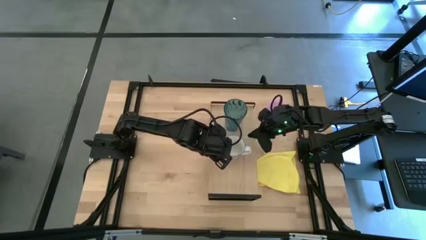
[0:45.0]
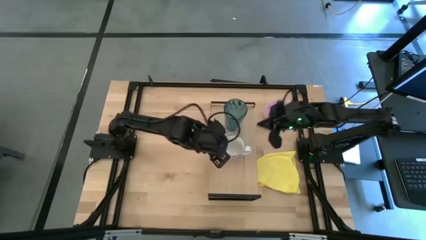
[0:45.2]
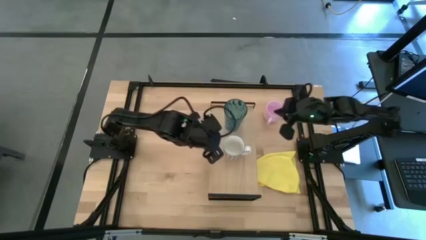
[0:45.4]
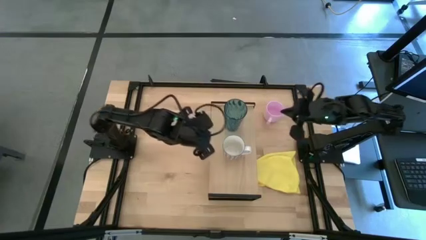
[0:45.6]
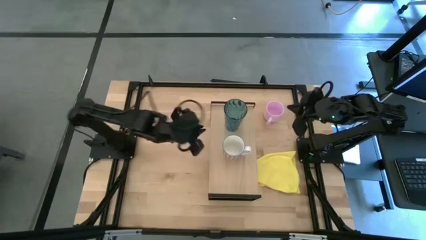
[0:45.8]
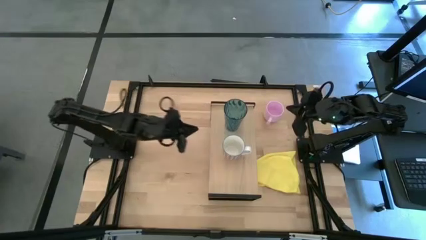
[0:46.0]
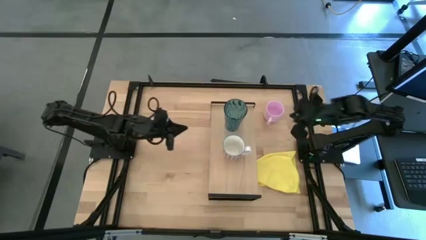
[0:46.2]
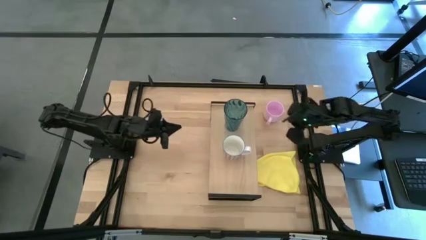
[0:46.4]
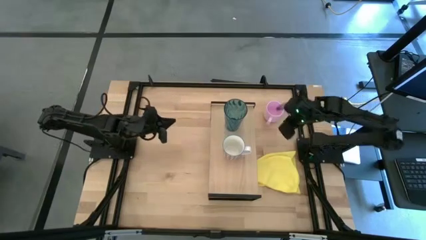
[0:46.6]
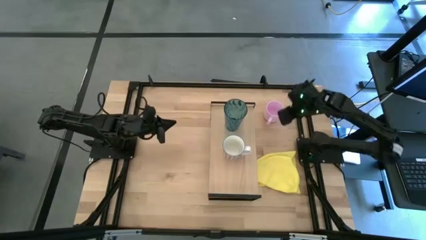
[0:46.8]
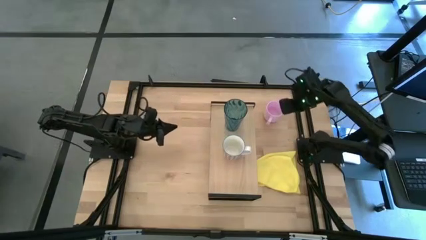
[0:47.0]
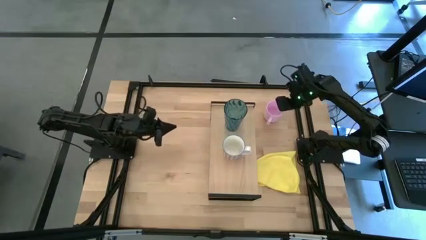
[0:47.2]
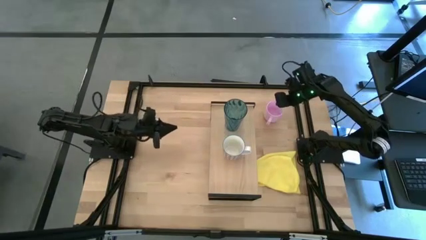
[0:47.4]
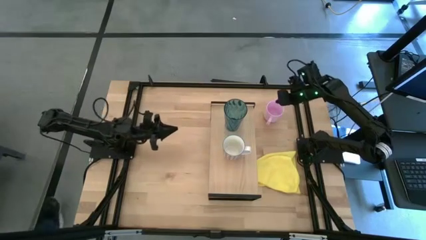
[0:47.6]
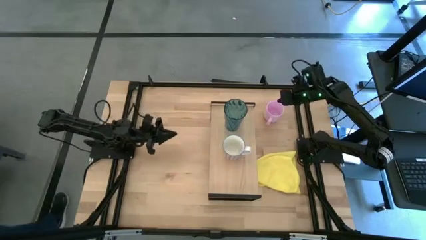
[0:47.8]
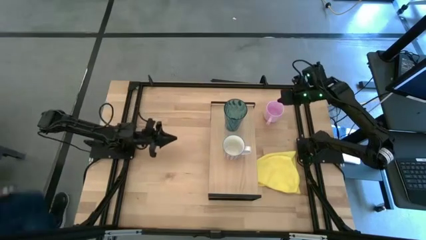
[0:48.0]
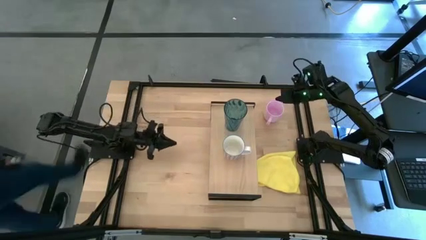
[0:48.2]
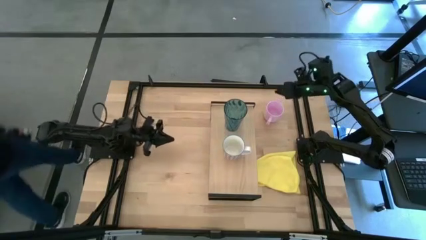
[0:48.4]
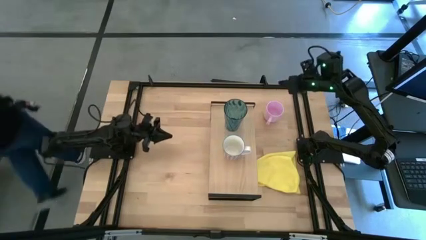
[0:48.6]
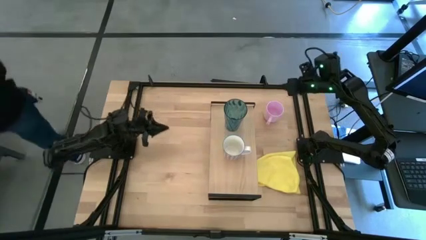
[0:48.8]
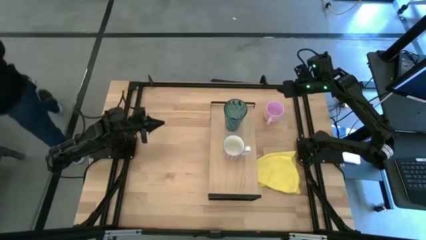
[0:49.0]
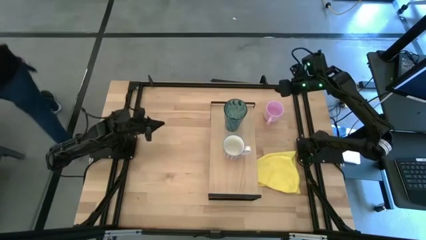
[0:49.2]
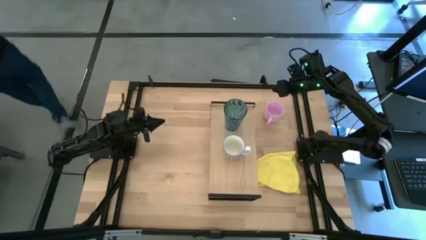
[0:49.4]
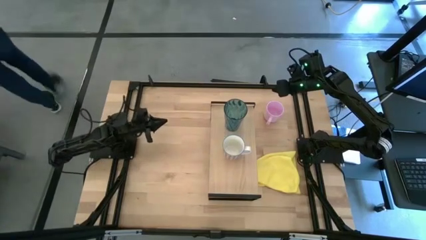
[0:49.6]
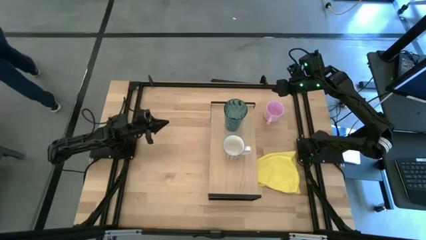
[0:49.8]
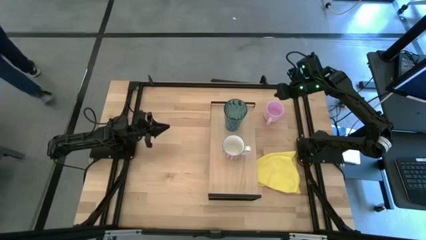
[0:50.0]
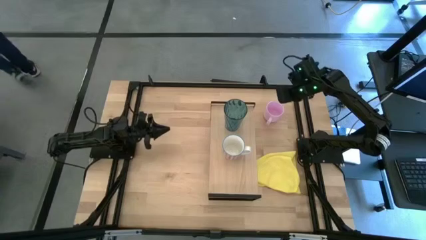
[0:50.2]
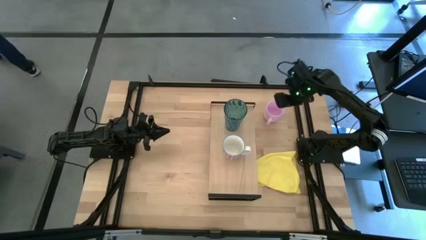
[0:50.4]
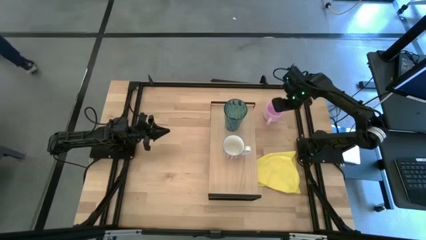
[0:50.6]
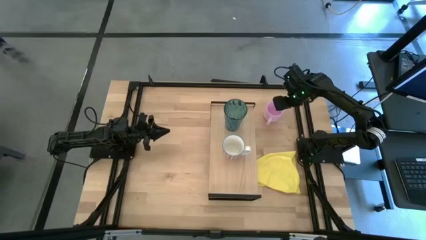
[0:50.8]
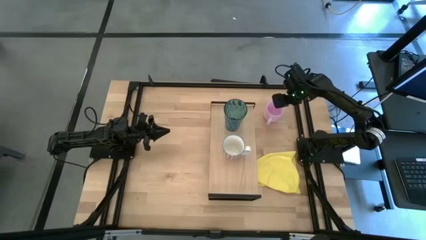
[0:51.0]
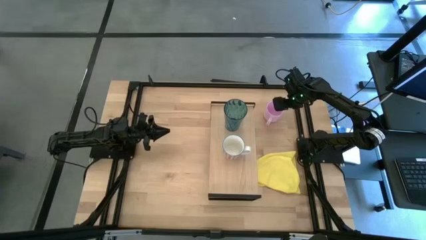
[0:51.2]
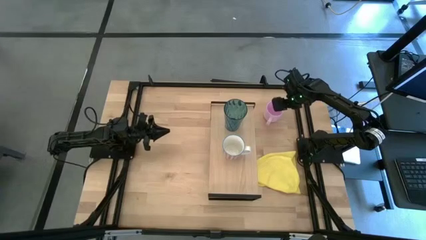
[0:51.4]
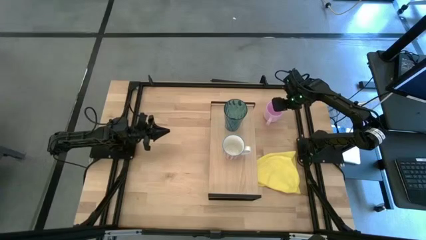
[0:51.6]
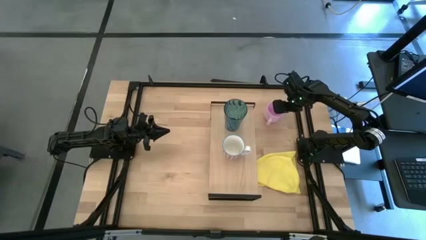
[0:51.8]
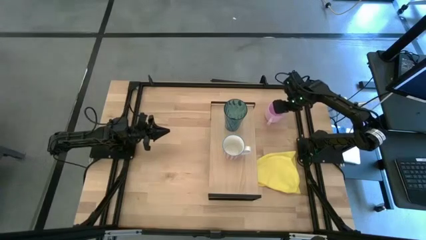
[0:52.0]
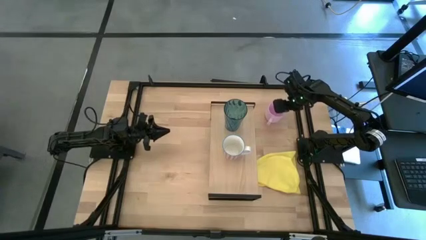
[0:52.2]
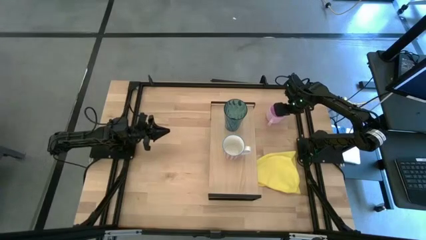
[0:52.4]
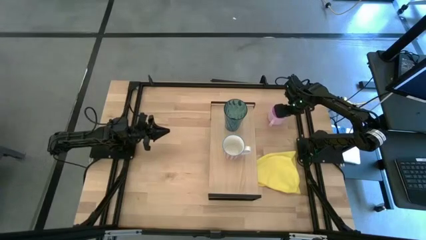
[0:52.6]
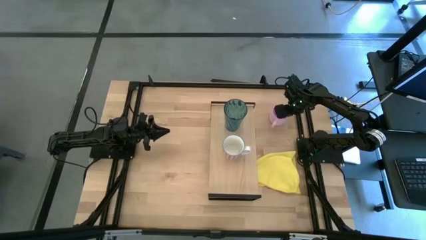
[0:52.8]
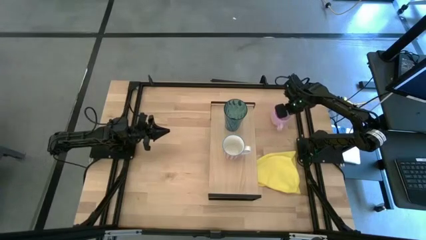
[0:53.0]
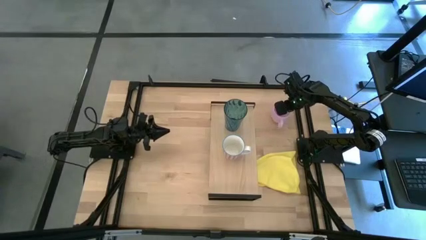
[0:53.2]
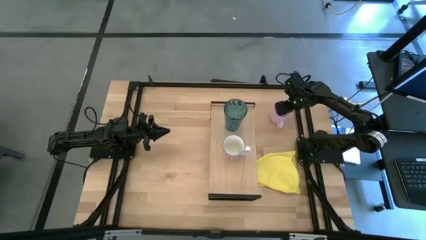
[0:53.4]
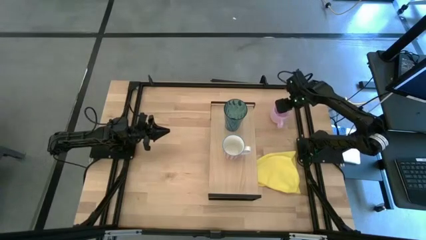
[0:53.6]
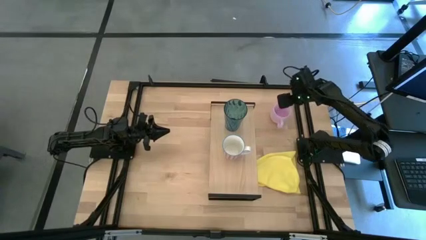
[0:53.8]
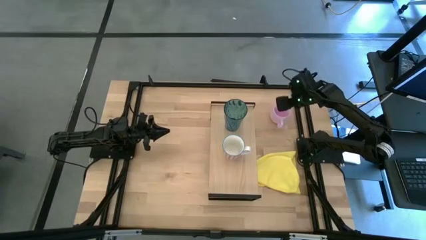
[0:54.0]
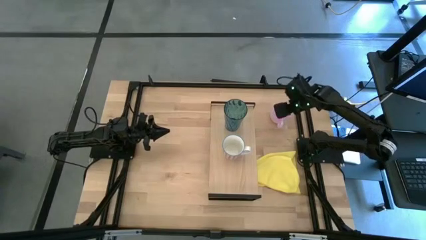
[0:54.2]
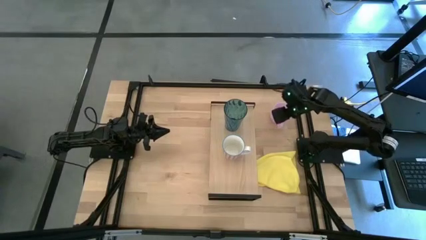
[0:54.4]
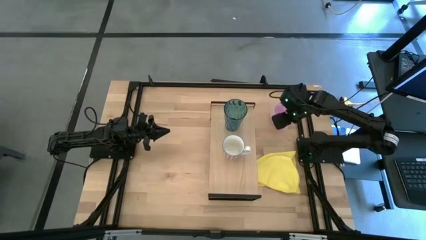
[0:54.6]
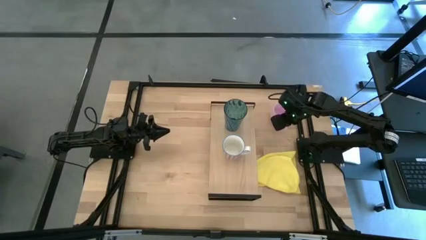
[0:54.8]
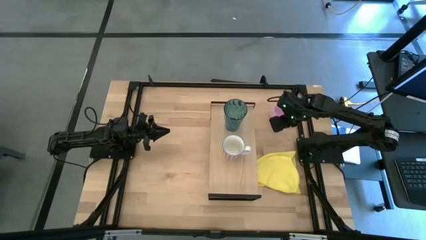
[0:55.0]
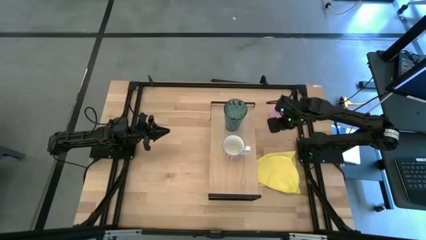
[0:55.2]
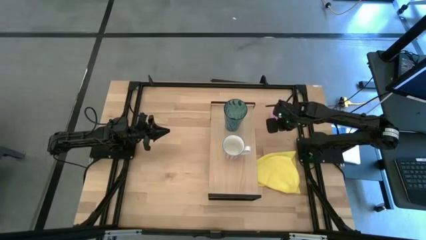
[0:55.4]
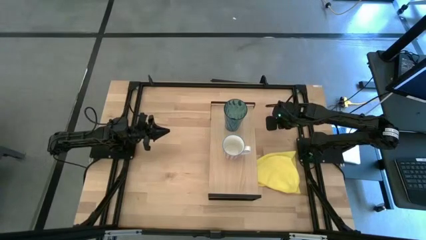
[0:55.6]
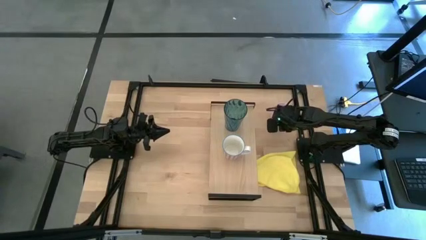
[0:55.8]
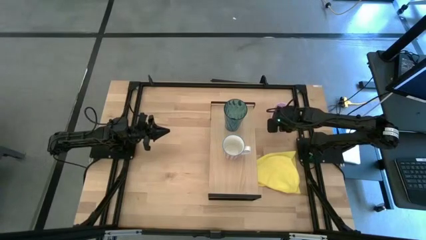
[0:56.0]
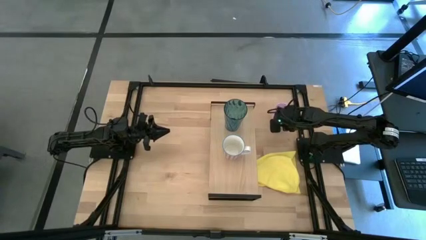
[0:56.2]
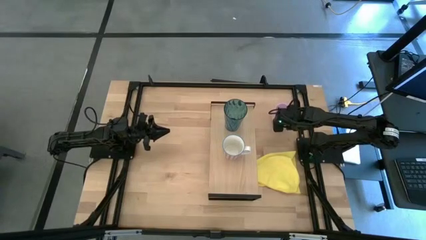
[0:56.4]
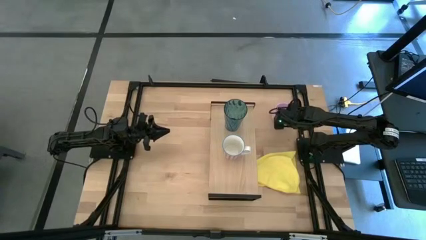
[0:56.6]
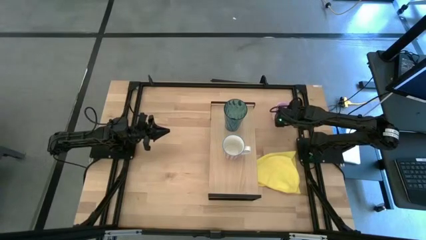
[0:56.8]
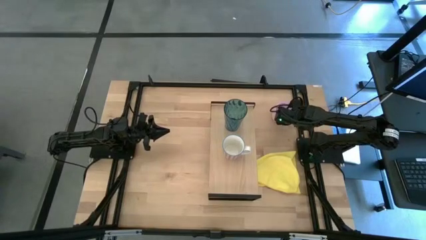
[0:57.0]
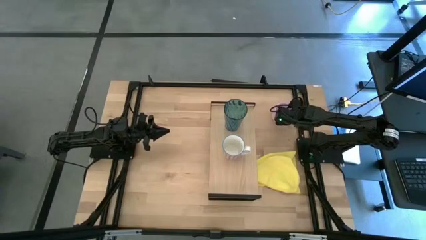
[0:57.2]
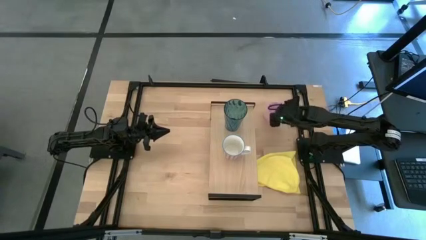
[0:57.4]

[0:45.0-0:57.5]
Task: Stack small to large cups/mugs on shelf
Put the pink mug on the shelf
